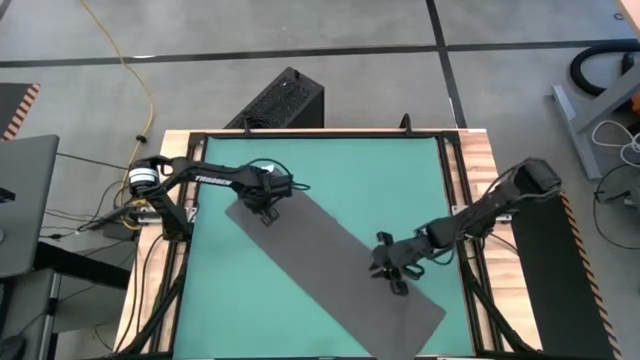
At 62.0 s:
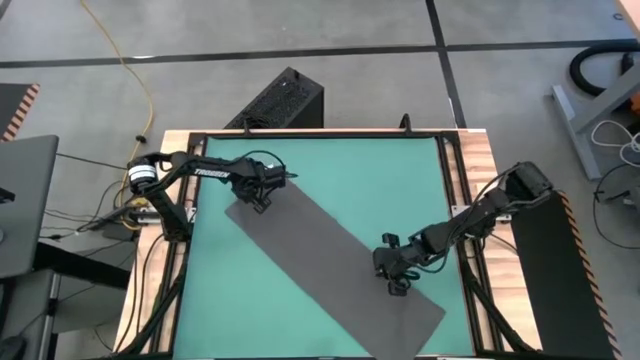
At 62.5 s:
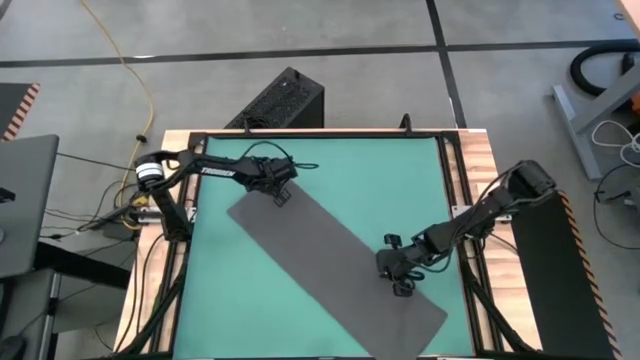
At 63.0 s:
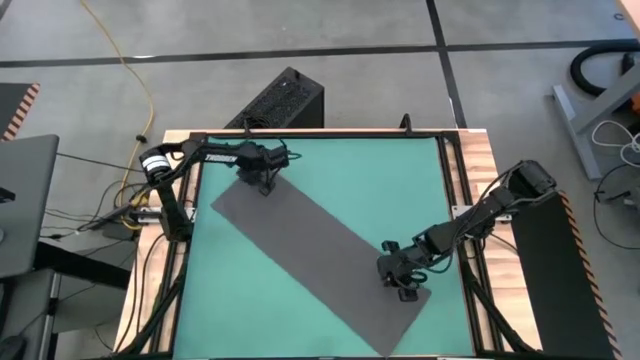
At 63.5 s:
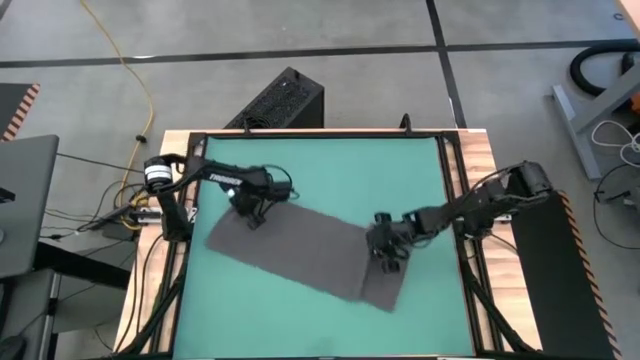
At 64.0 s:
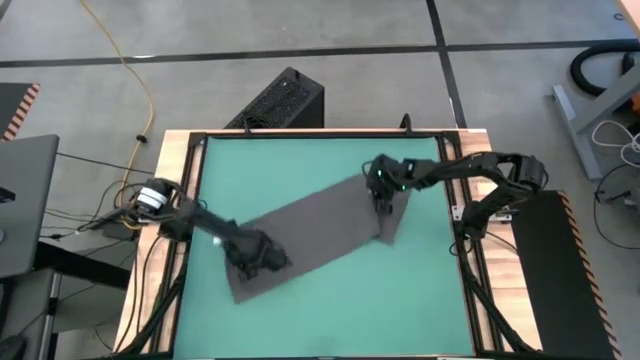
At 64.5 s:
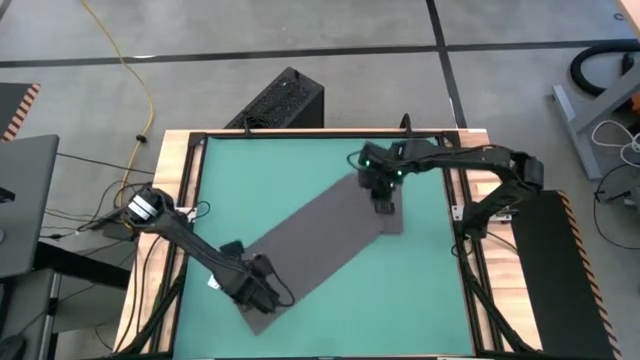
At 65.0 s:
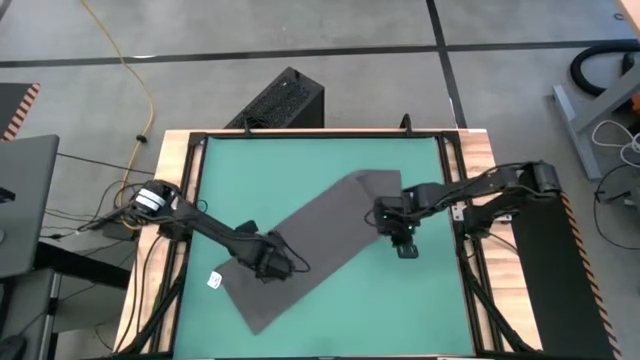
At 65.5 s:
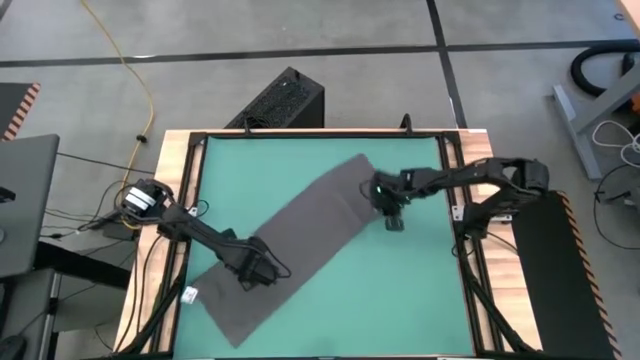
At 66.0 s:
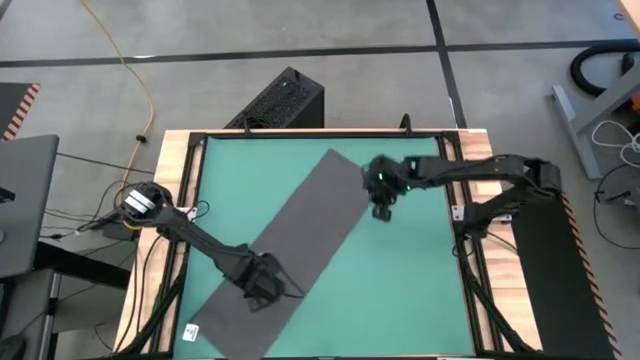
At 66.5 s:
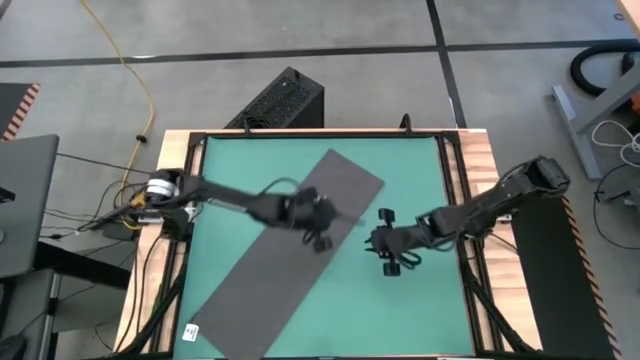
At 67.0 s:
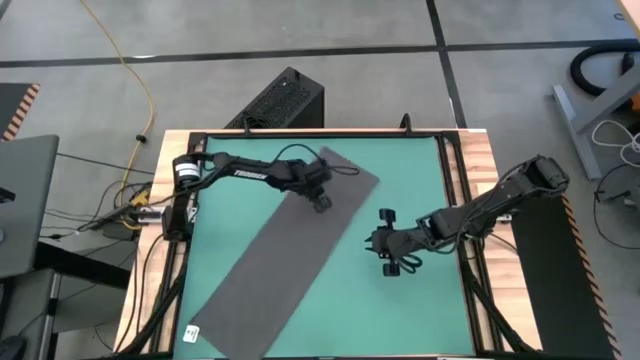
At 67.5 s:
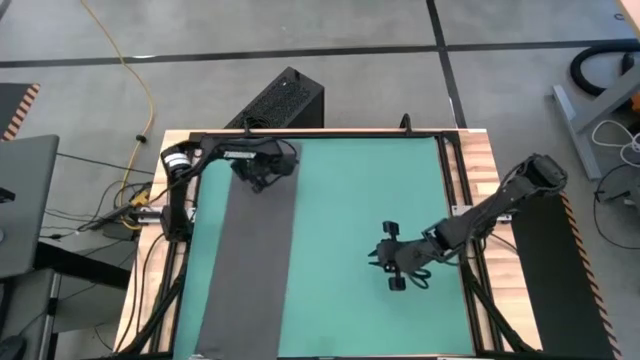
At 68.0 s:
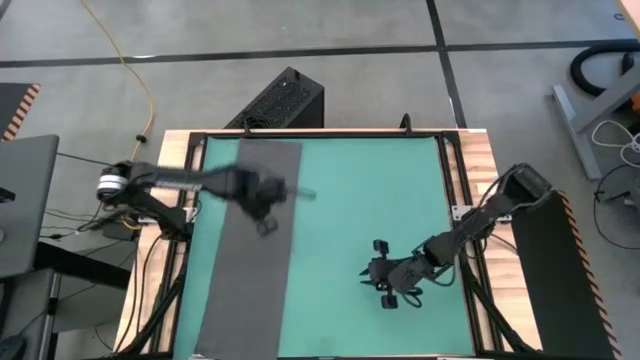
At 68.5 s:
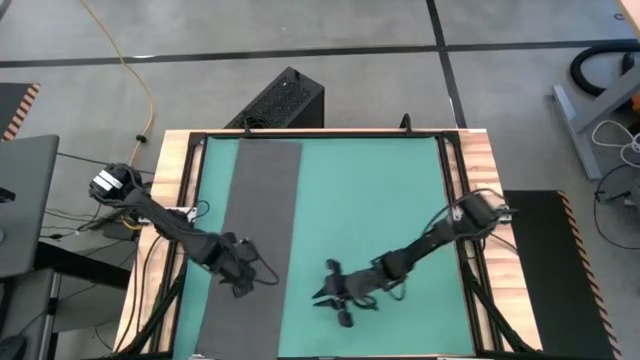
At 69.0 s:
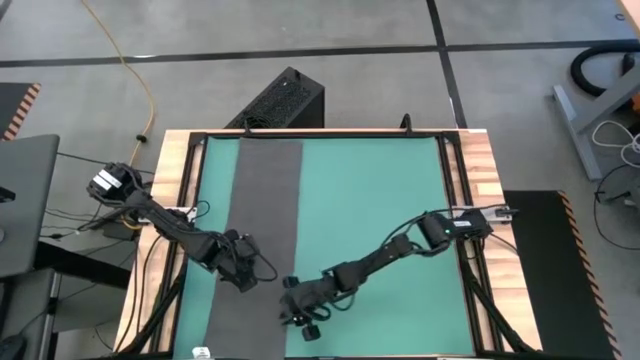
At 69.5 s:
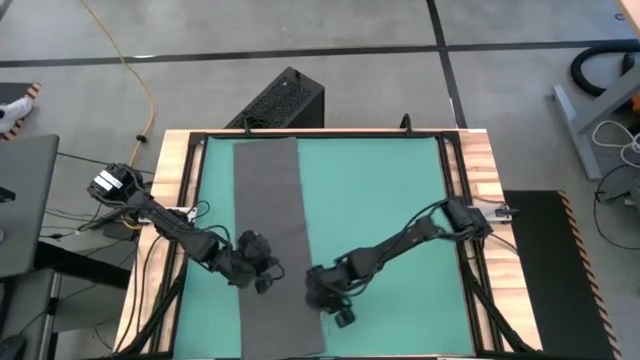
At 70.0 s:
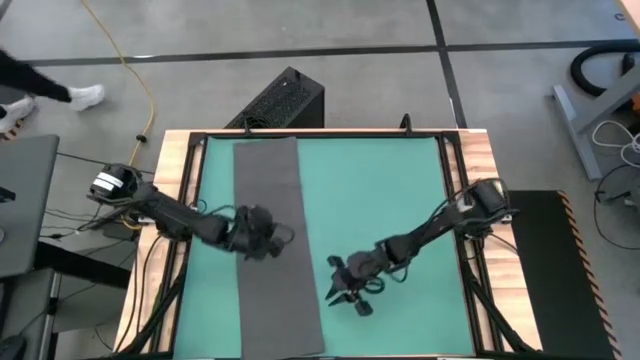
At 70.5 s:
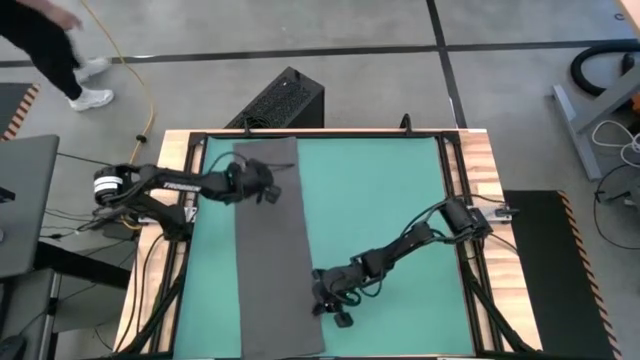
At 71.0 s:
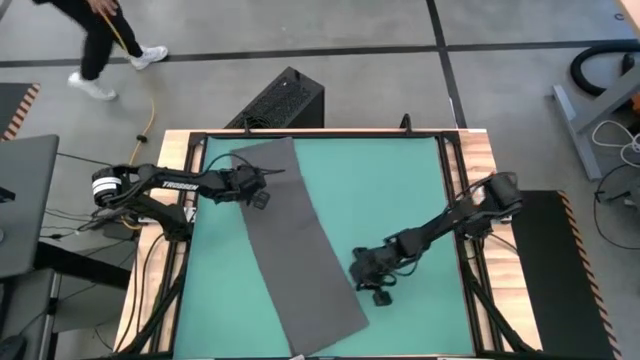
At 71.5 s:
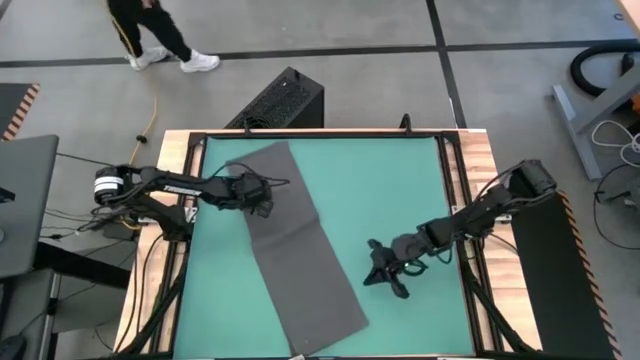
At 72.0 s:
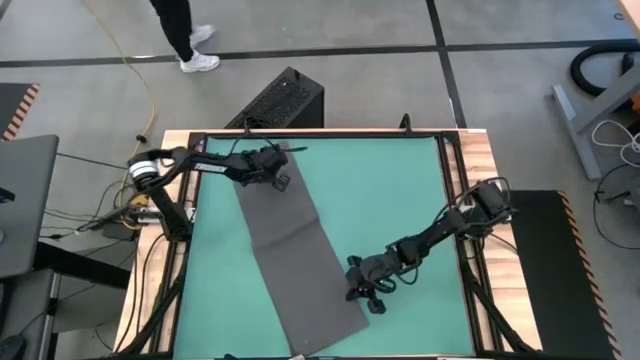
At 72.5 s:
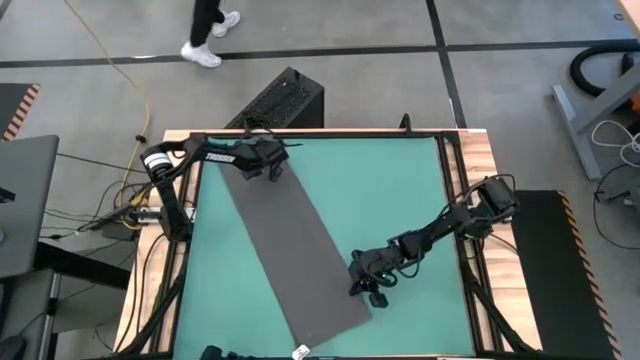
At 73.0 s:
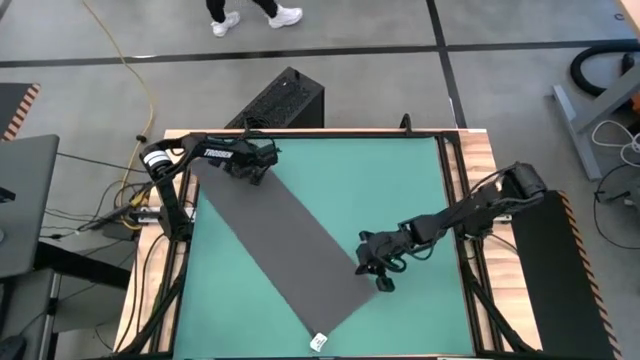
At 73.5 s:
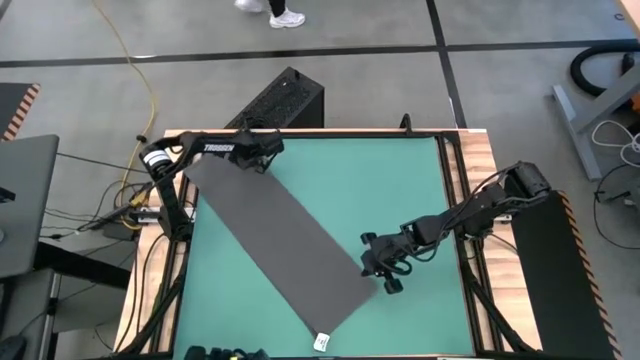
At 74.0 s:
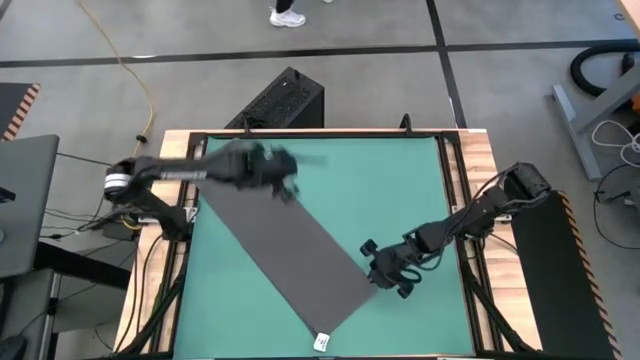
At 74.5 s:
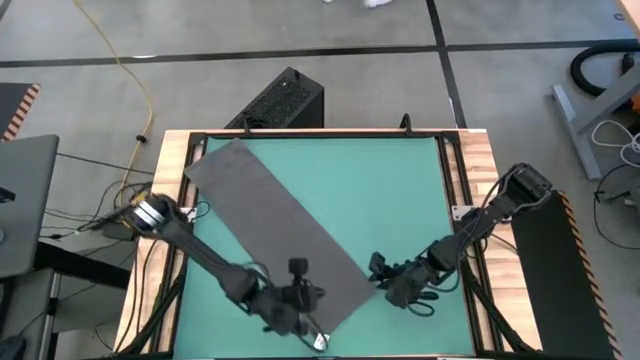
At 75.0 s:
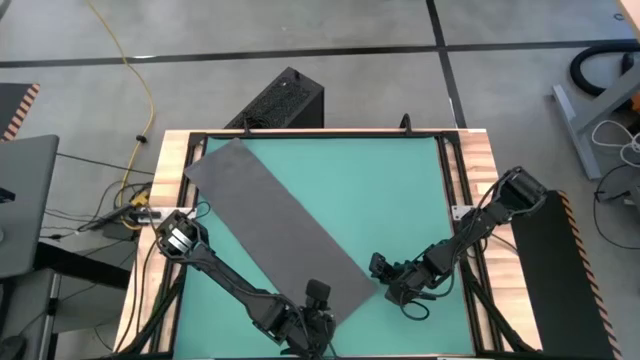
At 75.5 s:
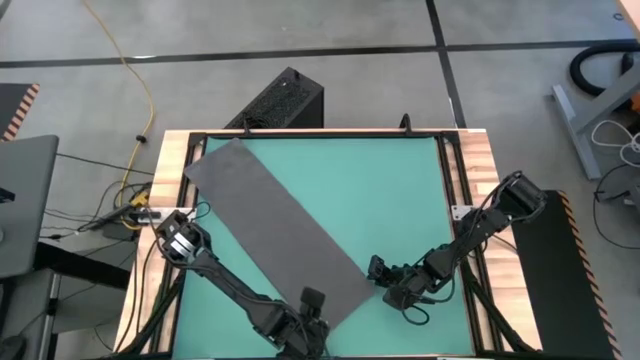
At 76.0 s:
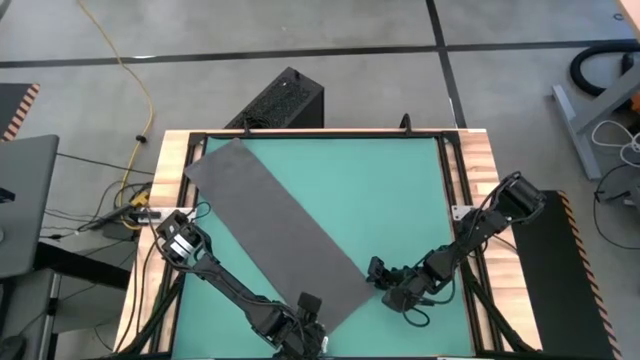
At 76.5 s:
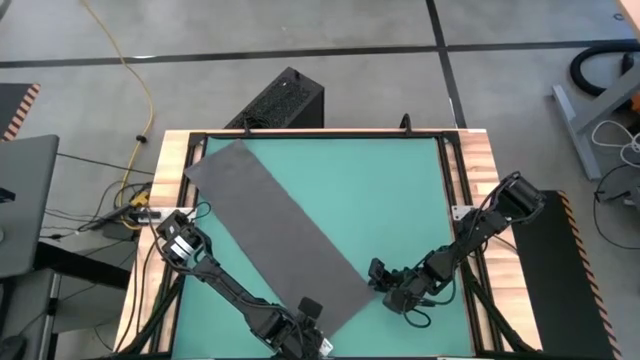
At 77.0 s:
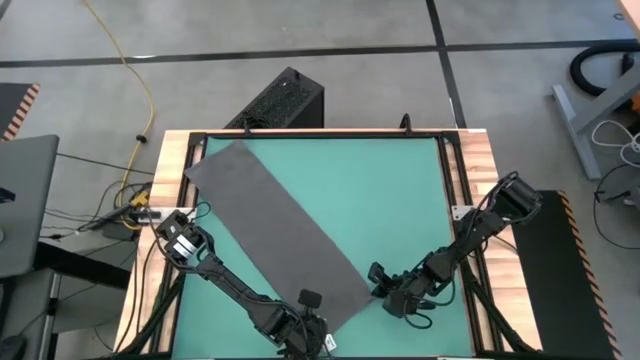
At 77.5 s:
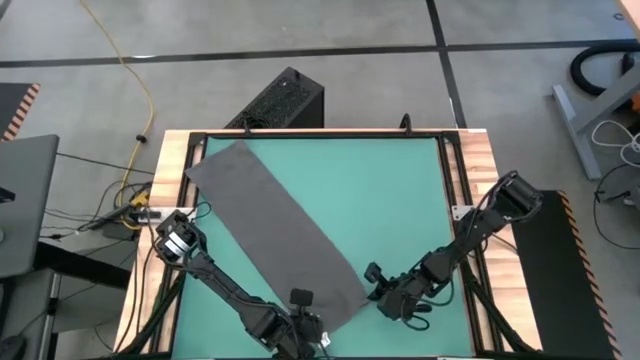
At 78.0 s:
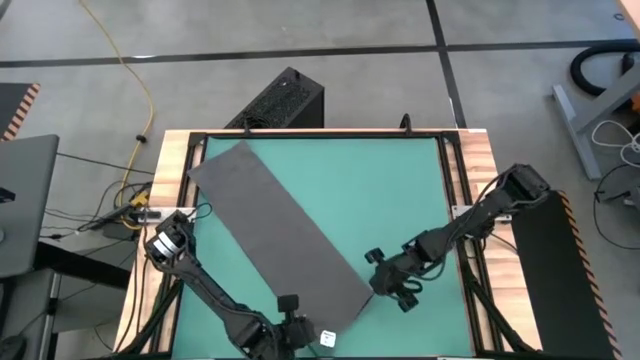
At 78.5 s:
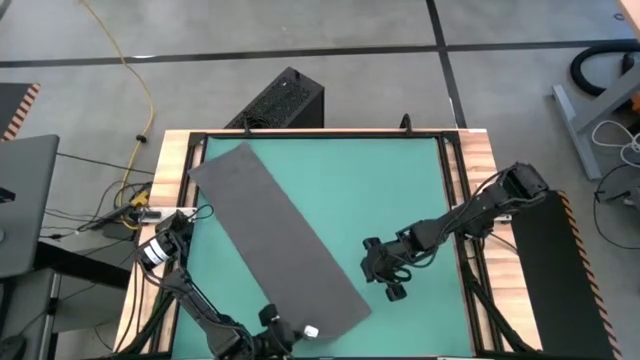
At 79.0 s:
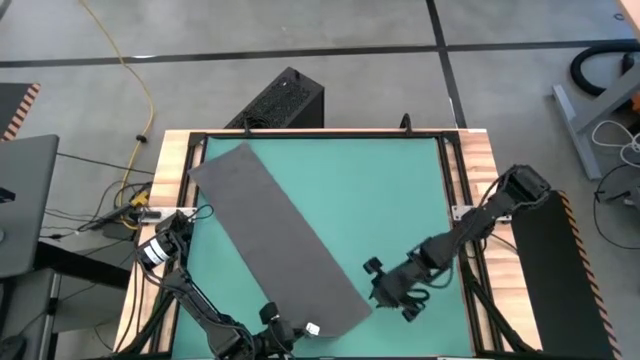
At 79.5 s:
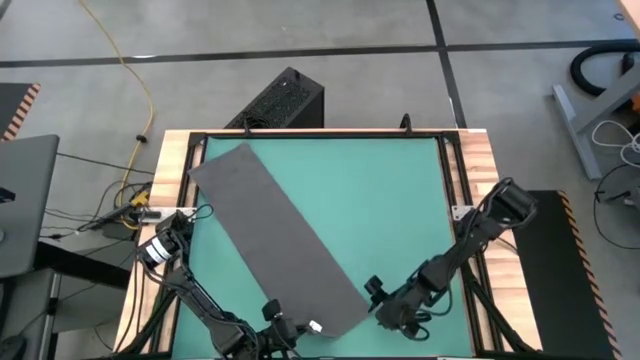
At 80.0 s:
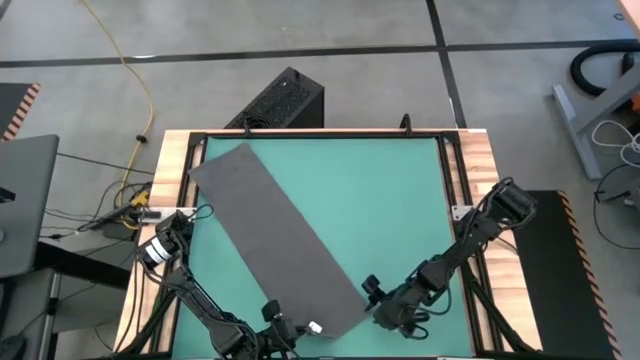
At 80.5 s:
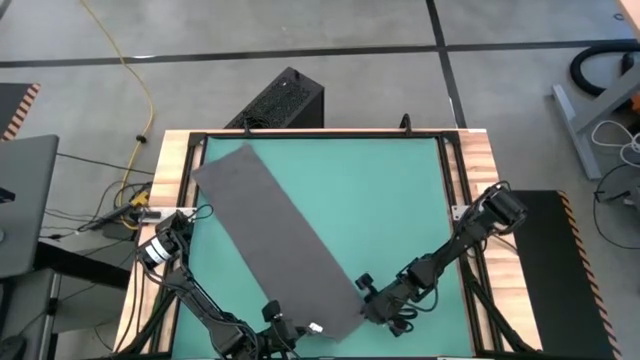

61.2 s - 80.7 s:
Task: Roll towel
Roll the gray towel

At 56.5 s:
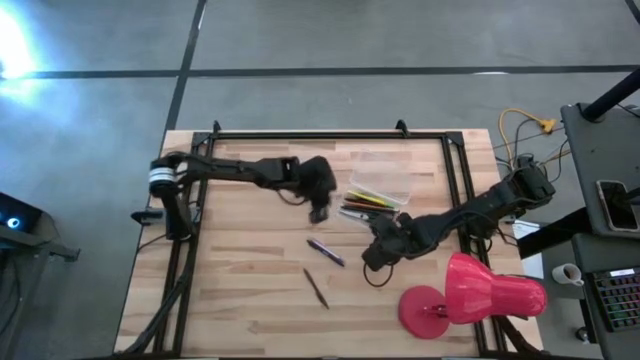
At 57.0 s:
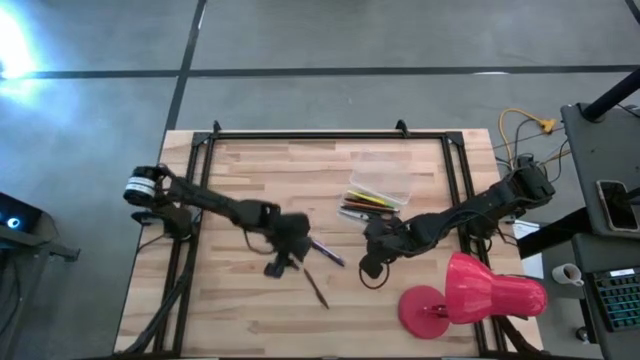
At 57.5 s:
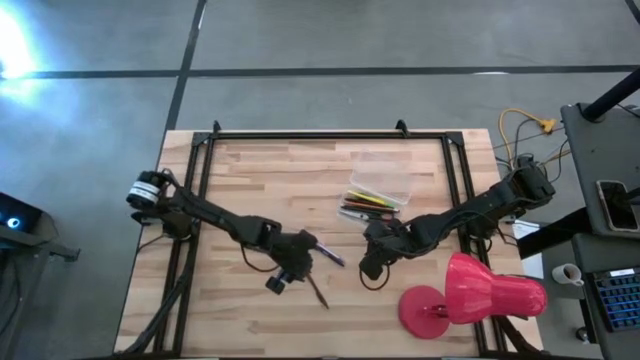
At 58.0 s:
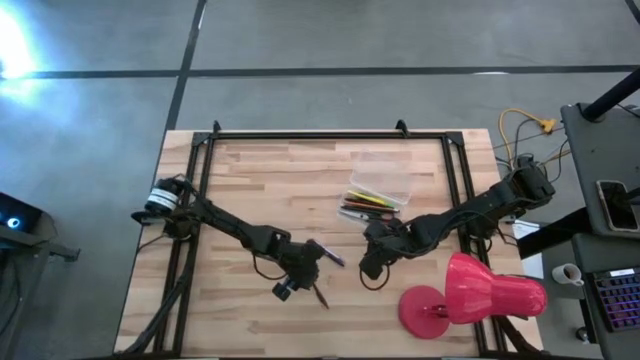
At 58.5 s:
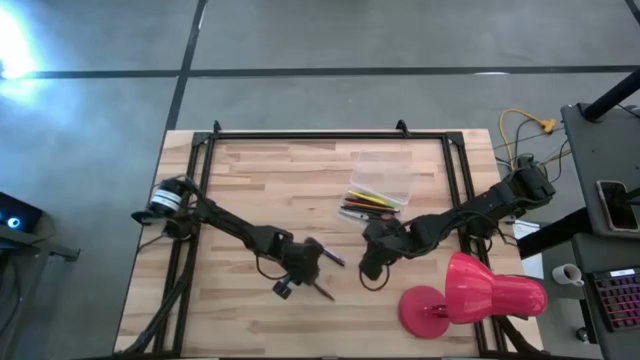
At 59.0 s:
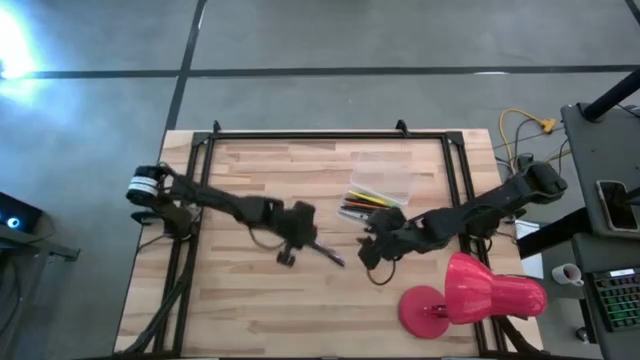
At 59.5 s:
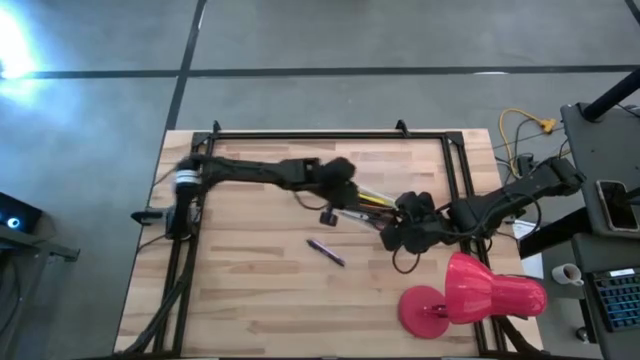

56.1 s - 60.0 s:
Task: Pick & place school supplies into a supply box
Put the brown pen into the transparent supply box

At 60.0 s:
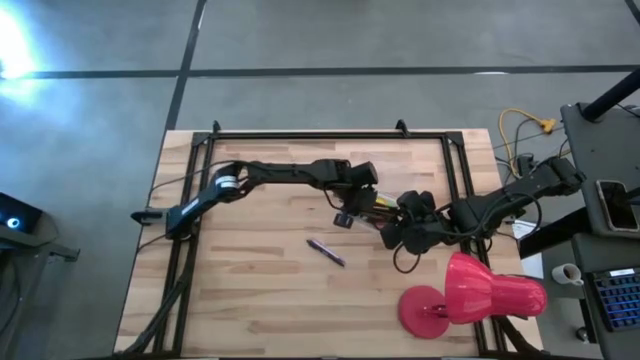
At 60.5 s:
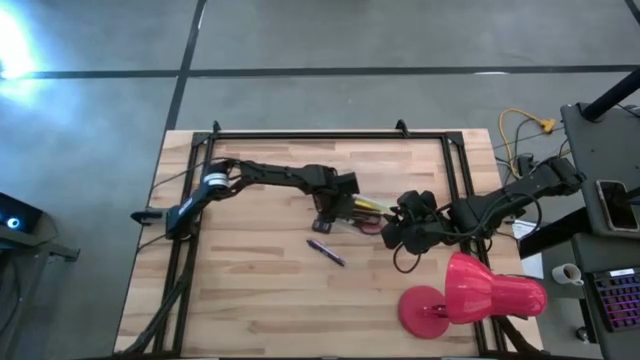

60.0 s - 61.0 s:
Adjust the transparent supply box
